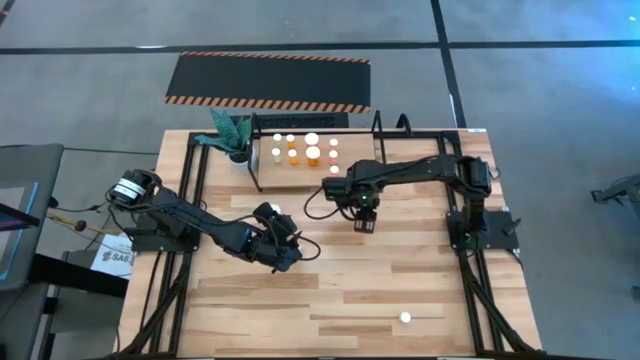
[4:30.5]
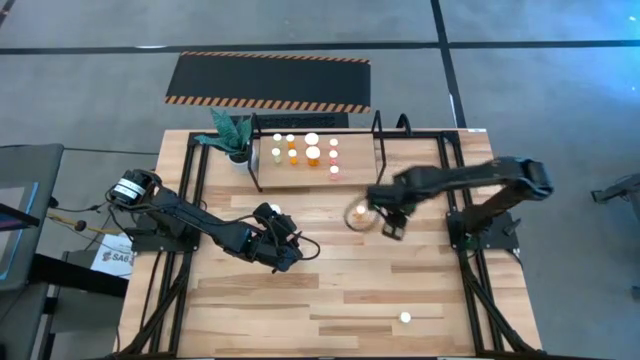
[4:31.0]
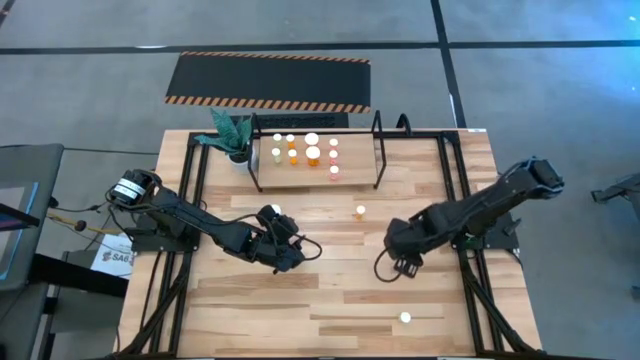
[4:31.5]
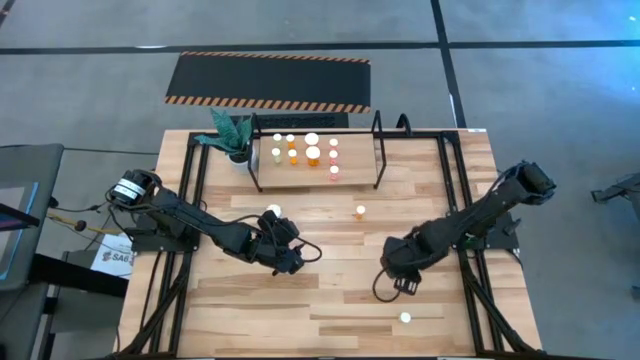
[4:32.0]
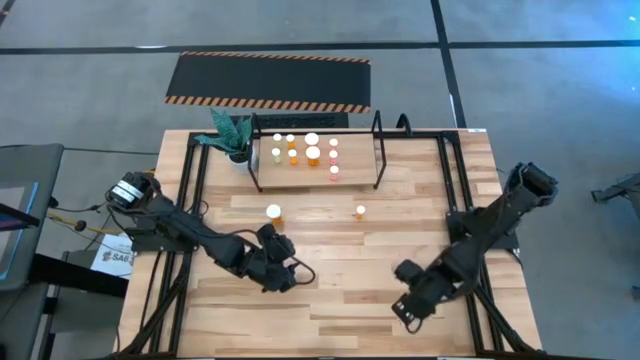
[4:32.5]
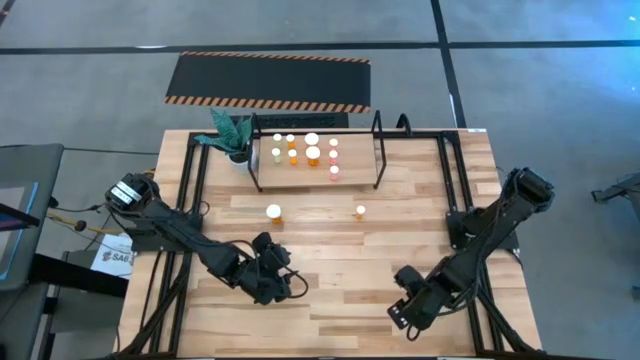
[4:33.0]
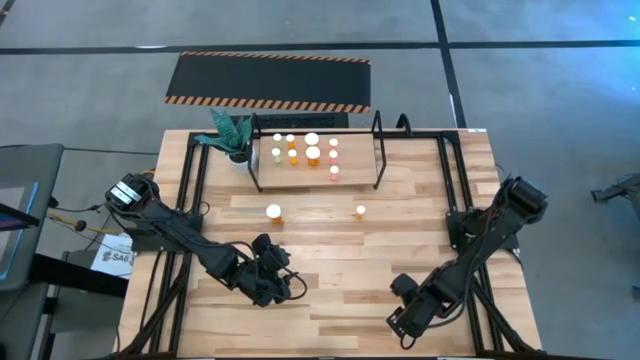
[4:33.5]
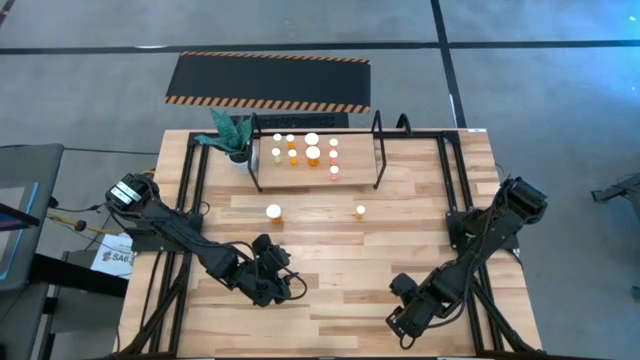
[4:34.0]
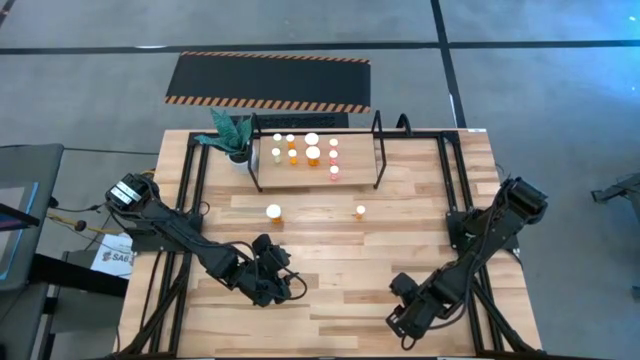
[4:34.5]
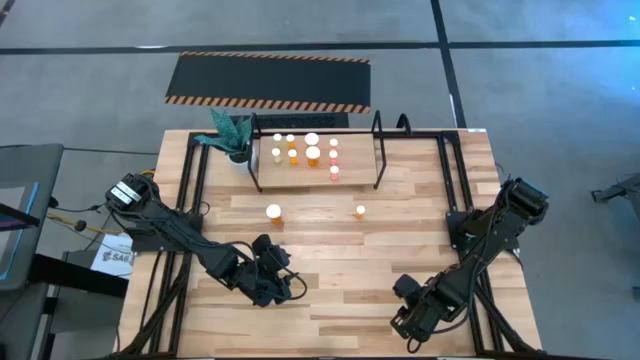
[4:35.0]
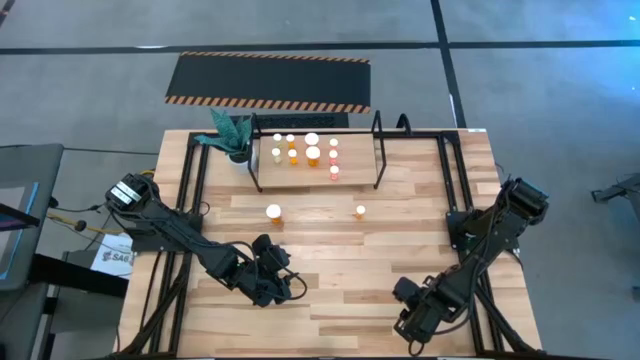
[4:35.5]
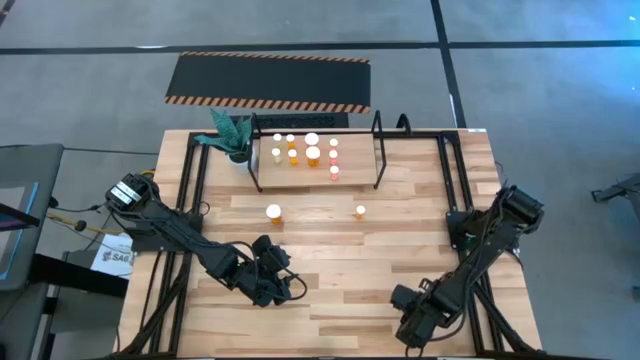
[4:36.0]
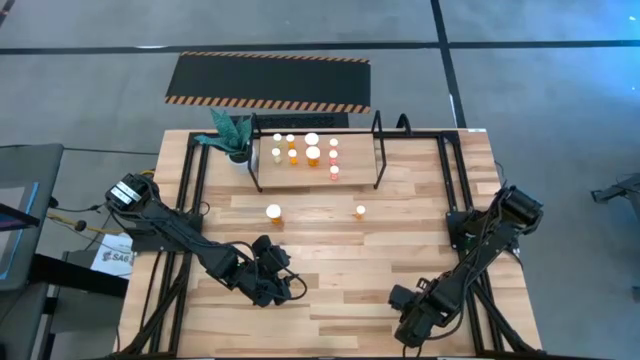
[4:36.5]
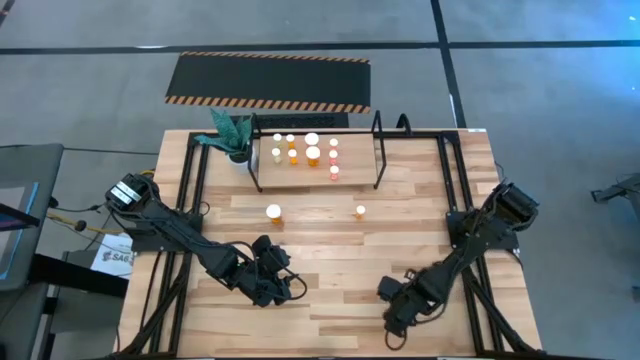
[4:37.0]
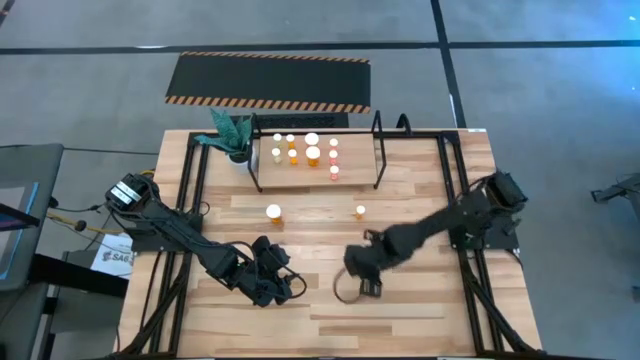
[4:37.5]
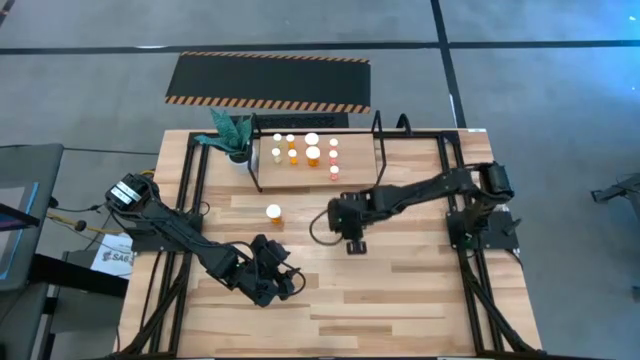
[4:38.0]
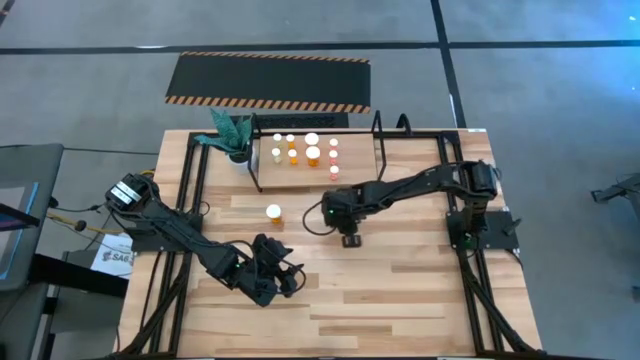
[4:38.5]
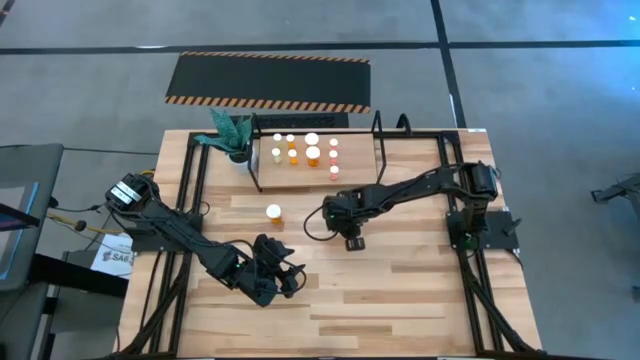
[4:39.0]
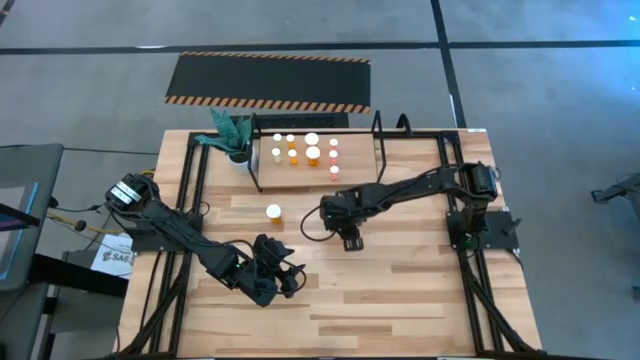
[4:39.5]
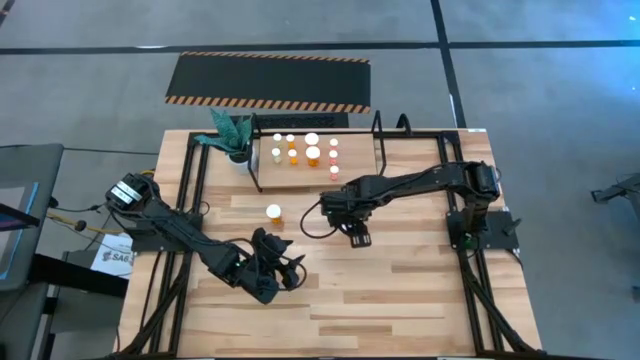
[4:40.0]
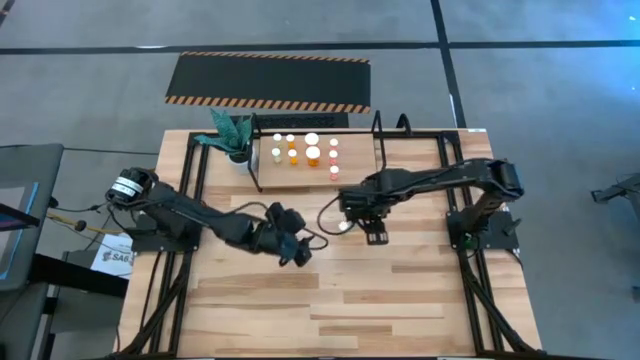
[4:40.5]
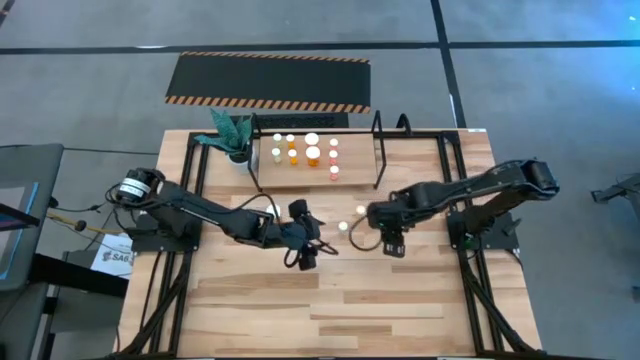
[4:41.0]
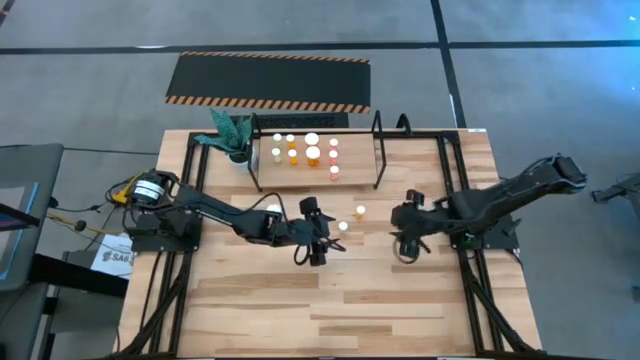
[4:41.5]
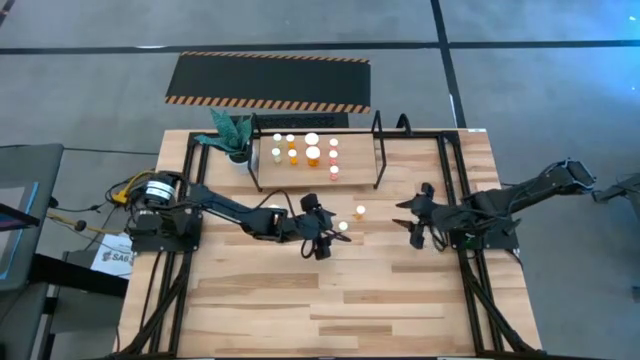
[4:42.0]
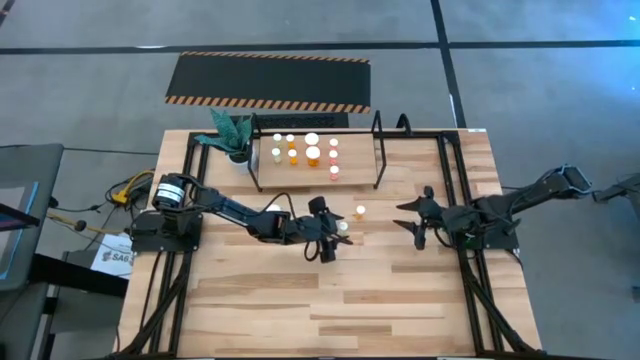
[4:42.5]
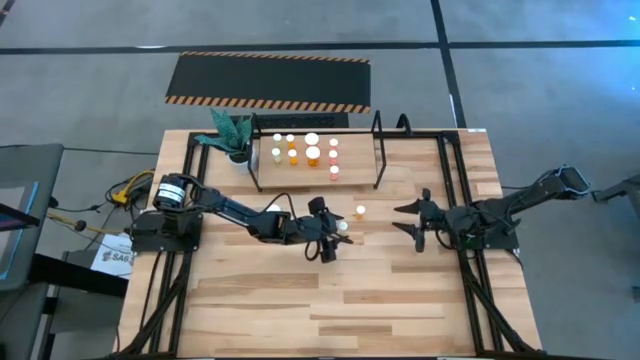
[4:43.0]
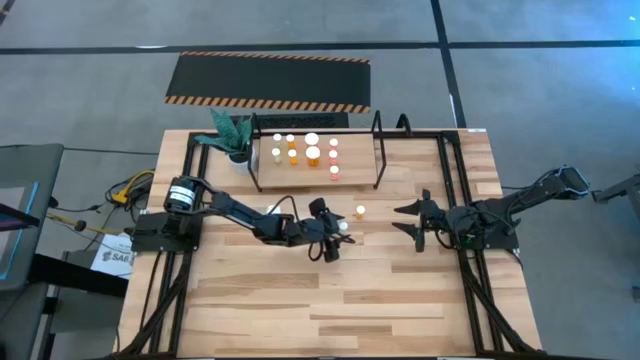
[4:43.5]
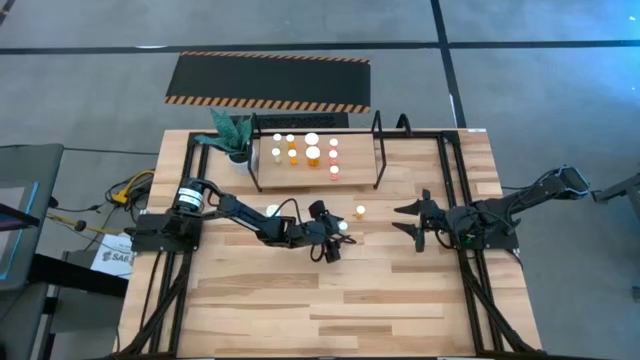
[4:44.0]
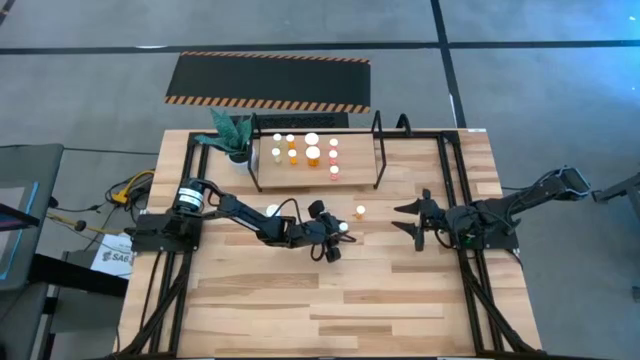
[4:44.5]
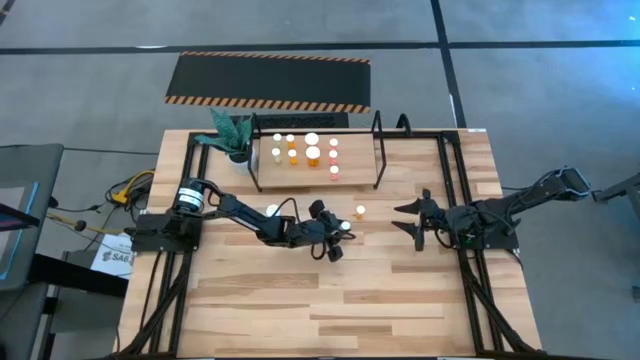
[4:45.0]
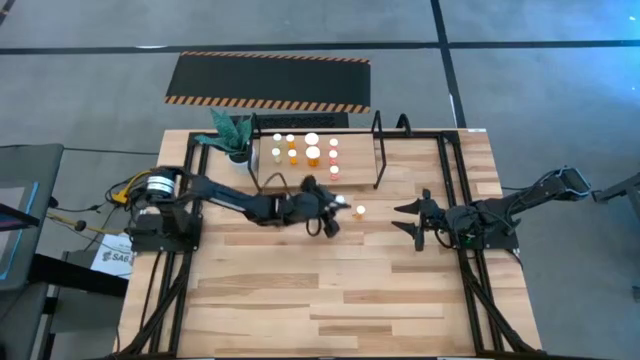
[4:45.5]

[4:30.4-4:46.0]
Task: Pick and place medicine bottles onto shelf by color
Put the yellow pill bottle on the shelf aligned with the other yellow pill bottle
